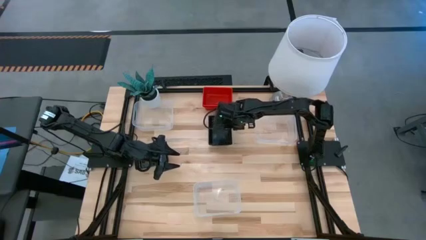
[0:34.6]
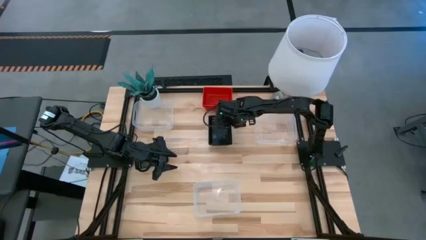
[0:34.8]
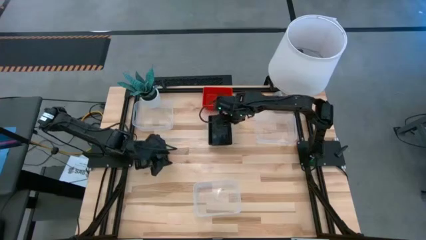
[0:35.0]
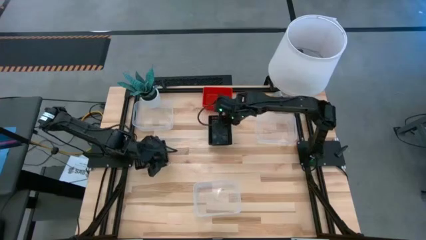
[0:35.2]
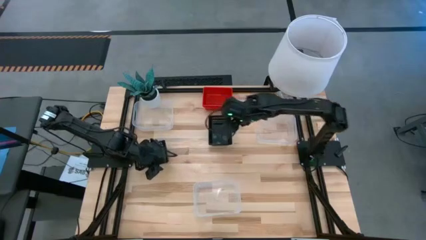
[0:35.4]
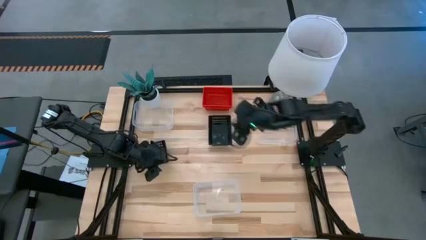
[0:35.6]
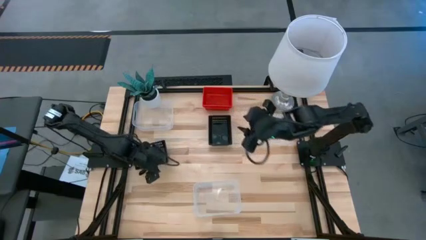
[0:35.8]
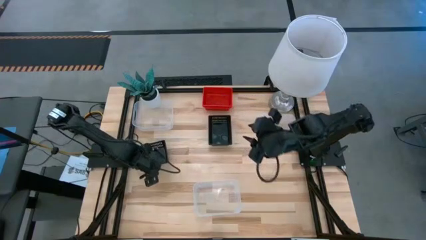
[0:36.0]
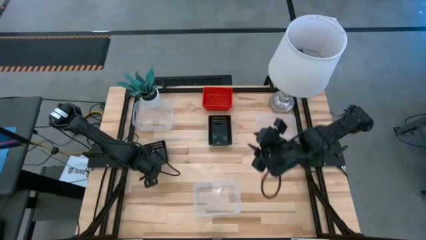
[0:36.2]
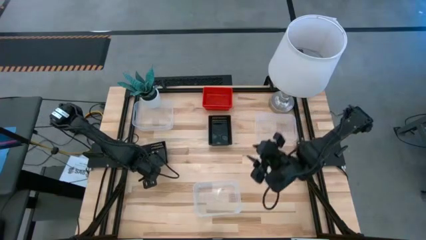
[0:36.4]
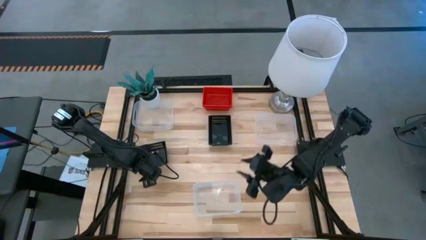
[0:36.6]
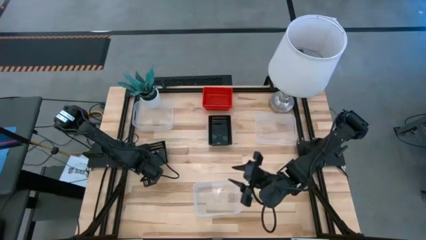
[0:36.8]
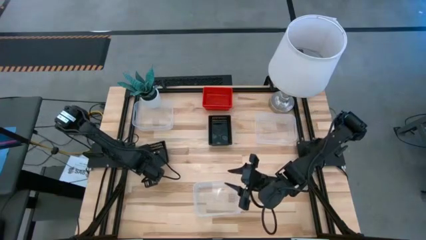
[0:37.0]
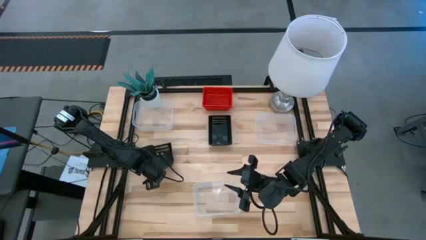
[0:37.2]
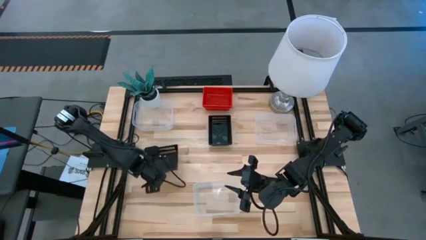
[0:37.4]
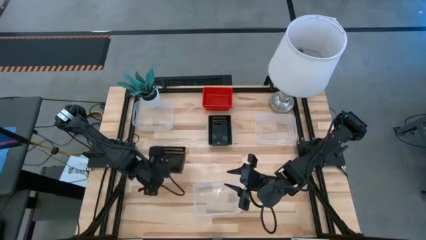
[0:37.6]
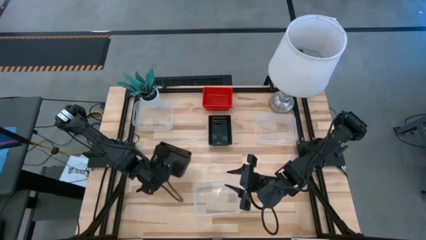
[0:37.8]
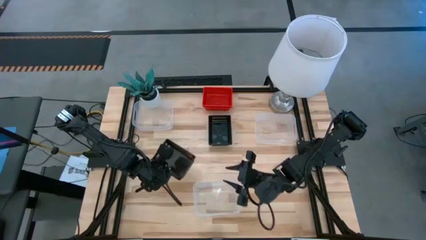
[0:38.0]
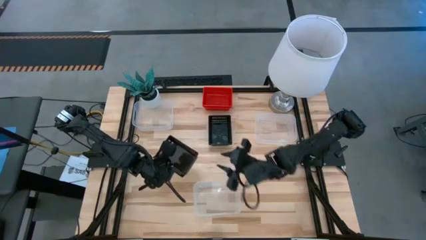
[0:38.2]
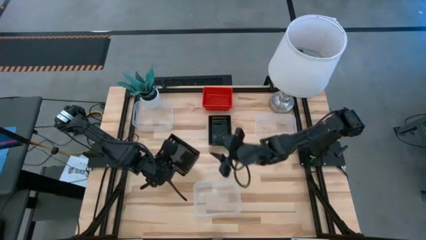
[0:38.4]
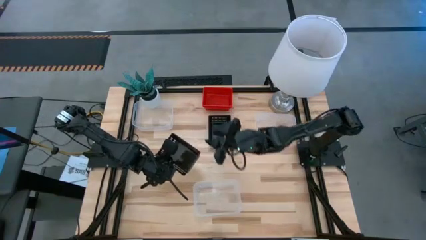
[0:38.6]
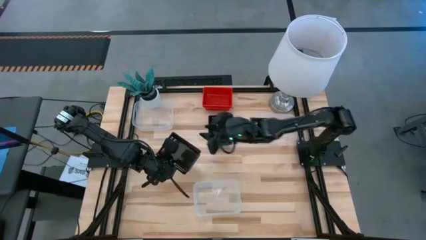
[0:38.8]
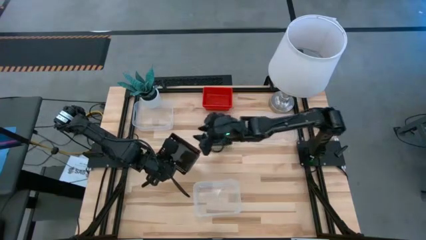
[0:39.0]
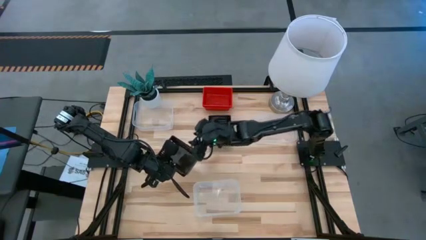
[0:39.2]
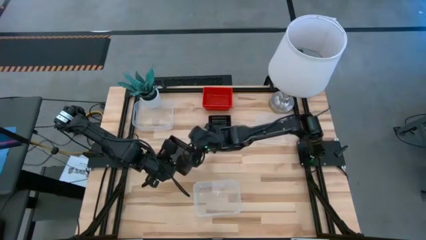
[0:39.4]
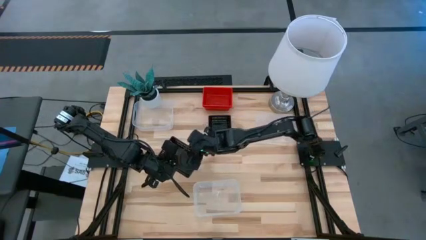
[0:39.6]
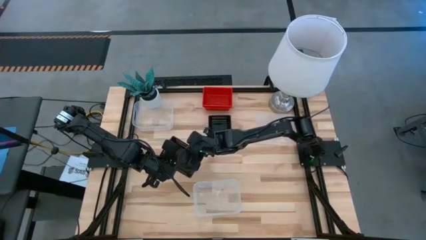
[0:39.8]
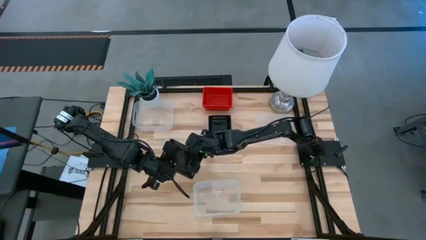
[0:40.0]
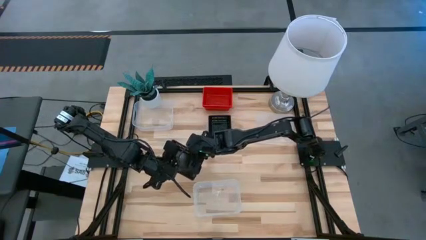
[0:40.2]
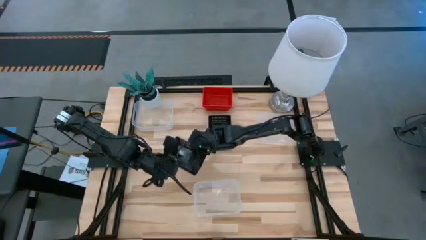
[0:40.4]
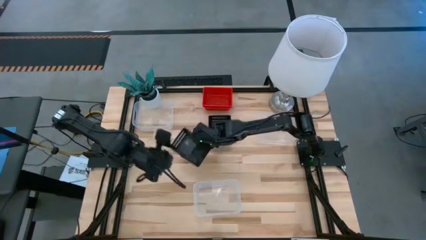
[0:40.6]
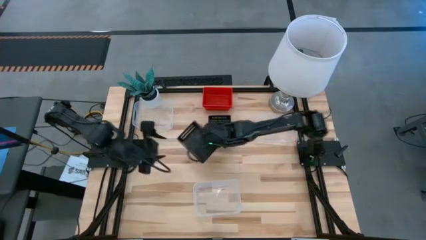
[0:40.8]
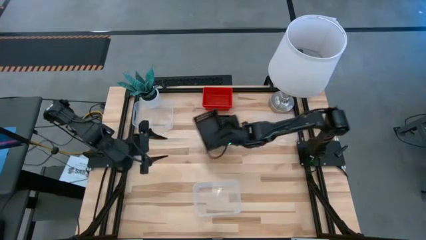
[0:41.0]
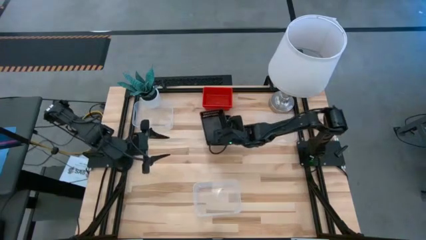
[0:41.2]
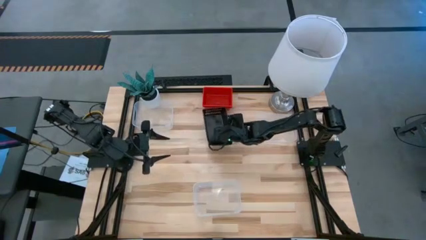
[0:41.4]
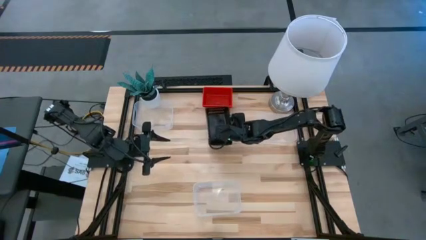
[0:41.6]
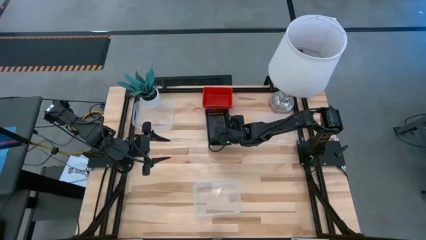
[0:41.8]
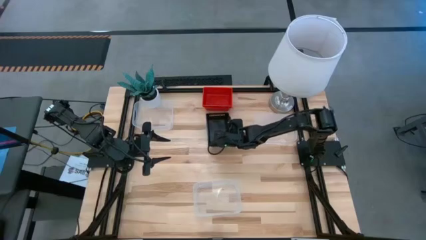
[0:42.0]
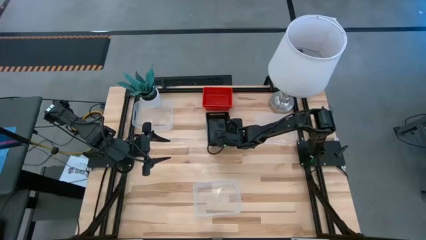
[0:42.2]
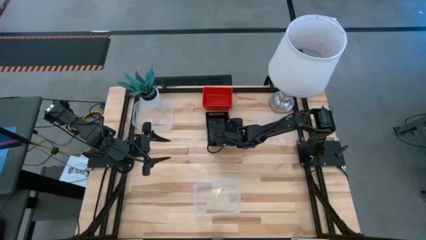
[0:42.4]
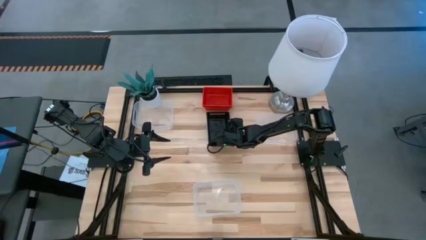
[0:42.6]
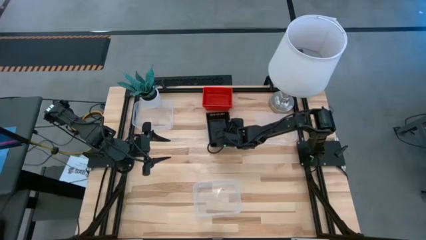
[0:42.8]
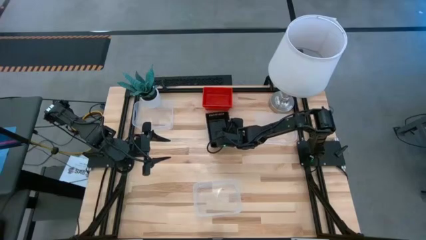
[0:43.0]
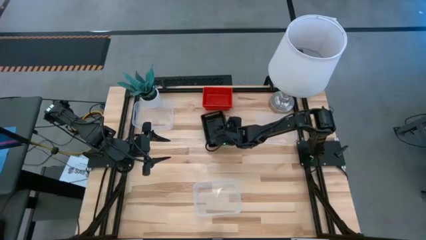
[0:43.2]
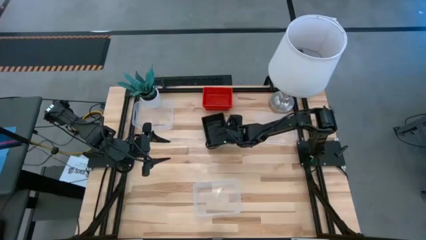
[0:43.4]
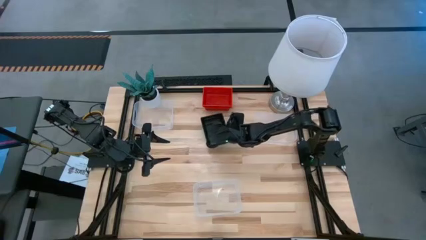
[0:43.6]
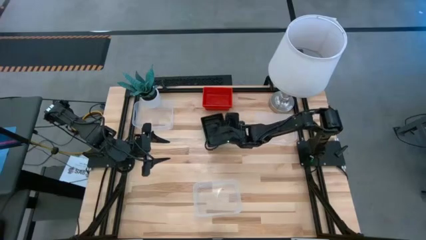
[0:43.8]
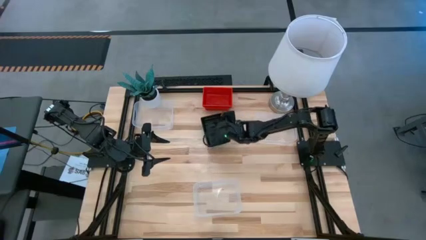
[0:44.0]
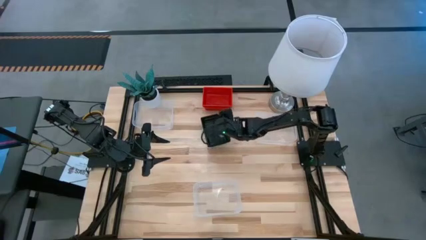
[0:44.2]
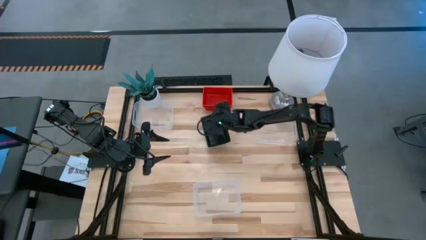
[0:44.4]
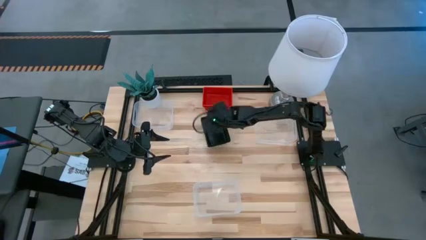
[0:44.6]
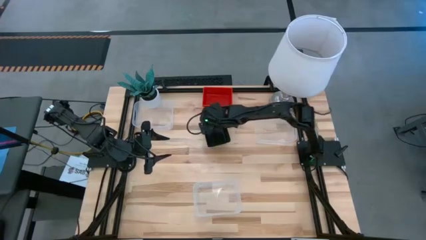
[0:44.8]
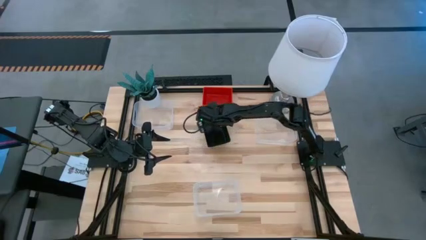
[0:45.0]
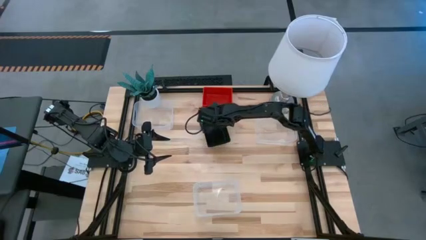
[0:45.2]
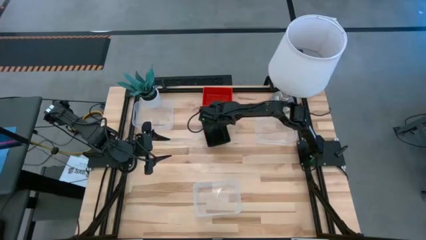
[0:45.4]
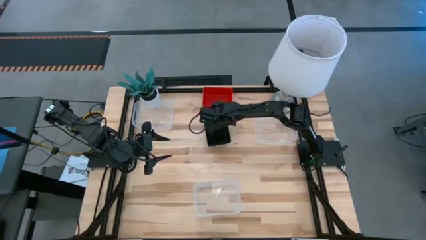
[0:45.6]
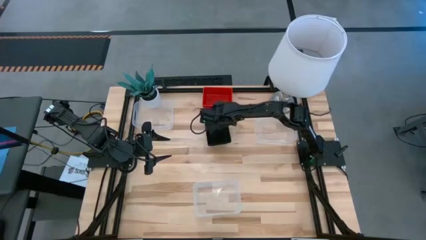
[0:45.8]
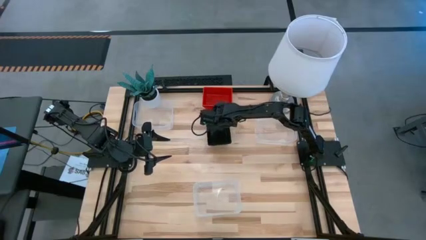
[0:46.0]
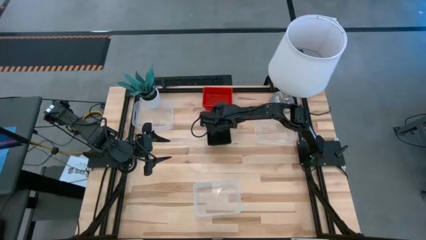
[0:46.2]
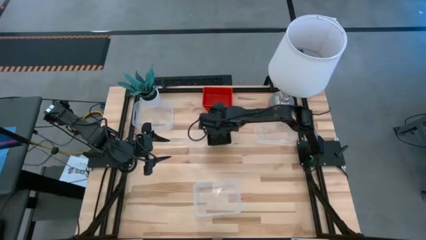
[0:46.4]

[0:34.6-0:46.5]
Stack the bottom black bin on top of the top black bins

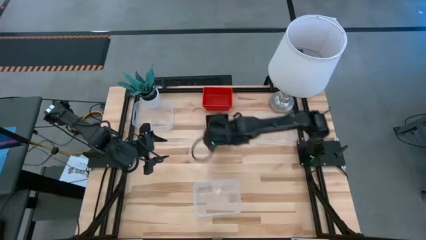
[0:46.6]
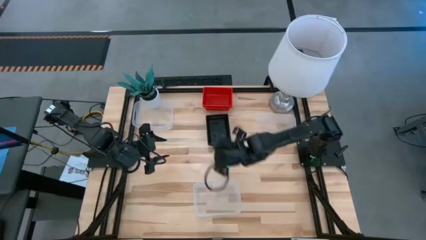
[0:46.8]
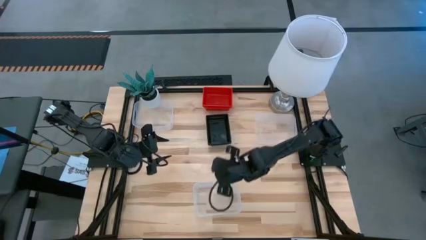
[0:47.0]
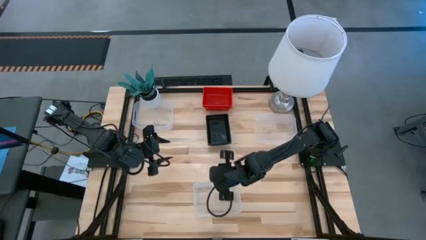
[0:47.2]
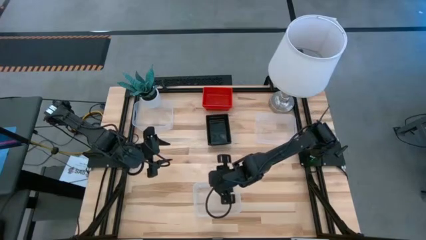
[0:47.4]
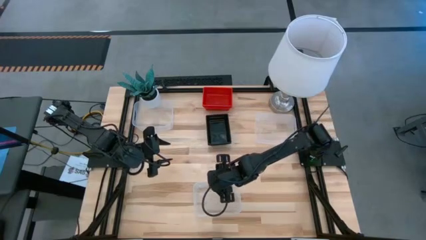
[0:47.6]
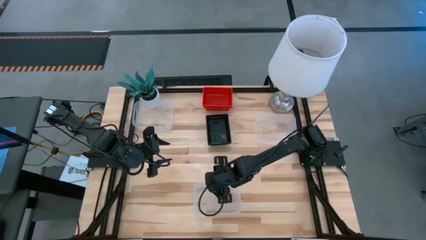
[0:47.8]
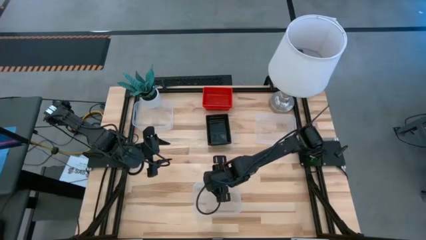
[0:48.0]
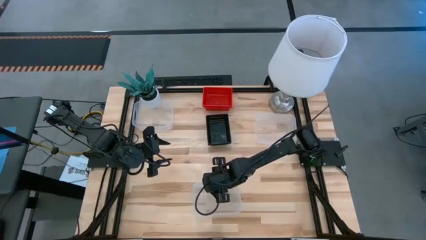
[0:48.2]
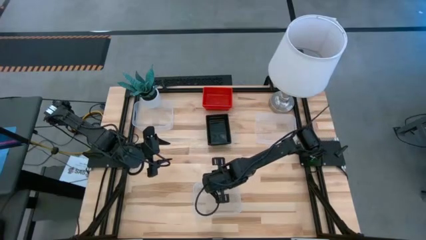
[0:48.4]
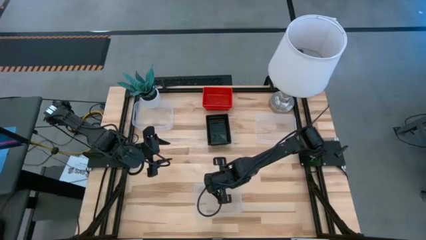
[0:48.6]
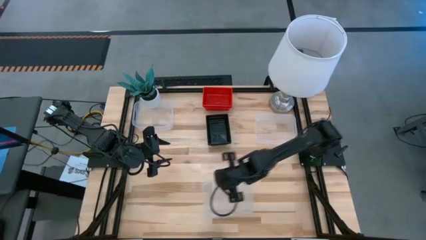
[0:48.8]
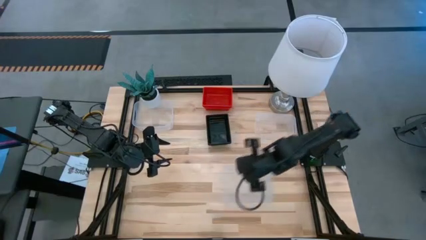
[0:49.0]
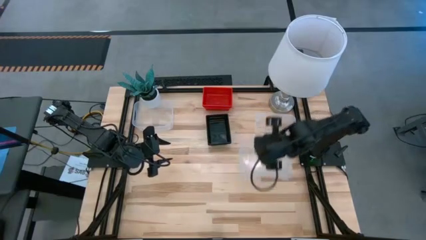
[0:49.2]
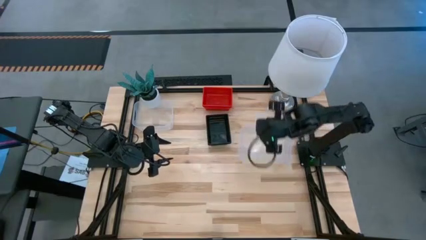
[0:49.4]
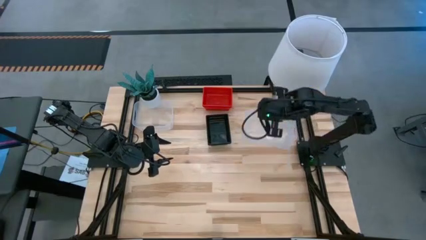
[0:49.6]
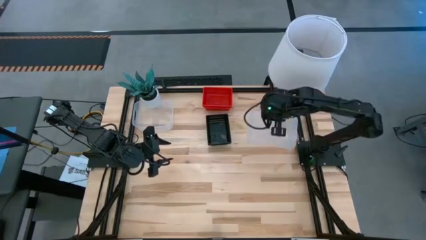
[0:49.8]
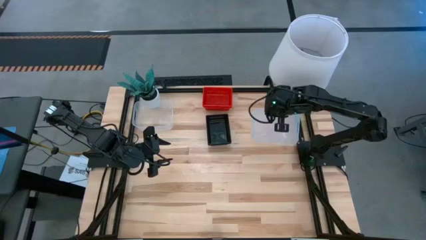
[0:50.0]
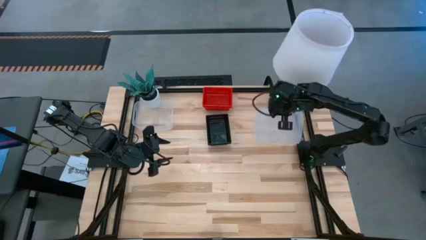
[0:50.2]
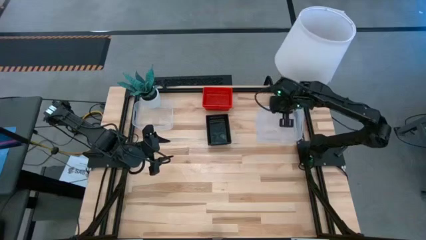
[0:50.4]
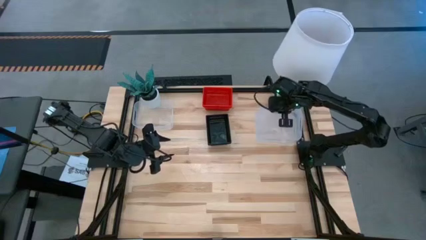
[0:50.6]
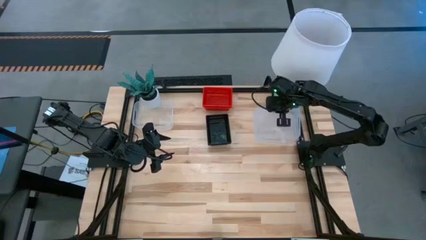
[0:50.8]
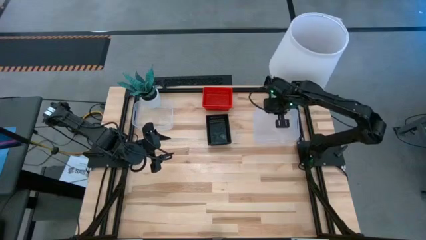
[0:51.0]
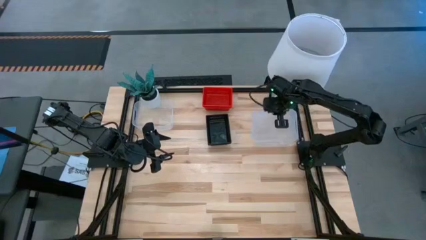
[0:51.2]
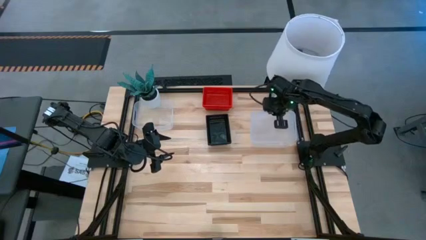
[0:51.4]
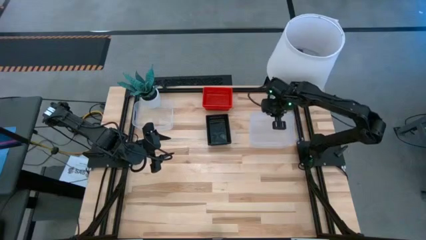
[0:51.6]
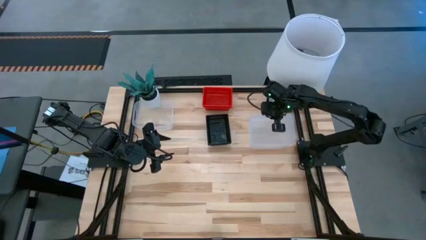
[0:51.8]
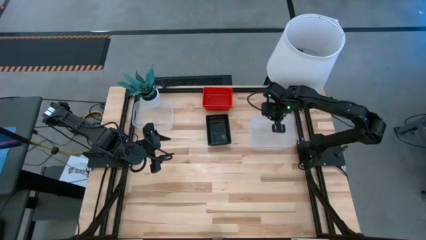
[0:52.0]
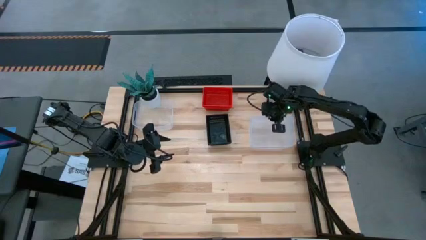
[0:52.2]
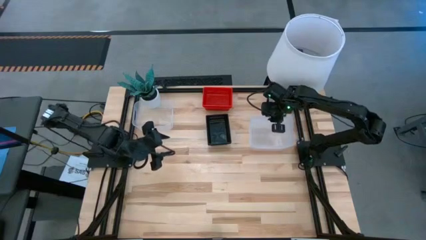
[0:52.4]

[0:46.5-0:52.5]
Stack the bottom transparent bin on top of the top right transparent bin
